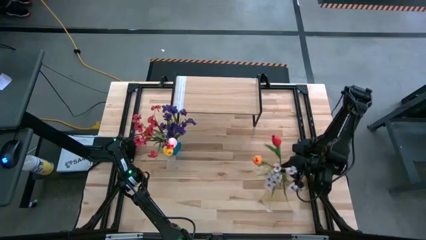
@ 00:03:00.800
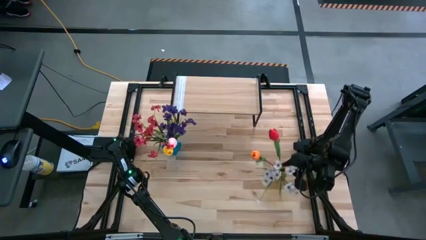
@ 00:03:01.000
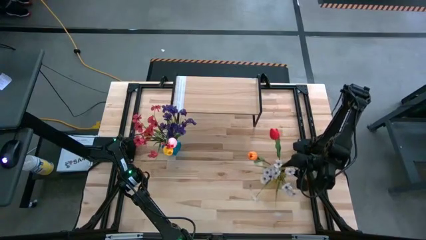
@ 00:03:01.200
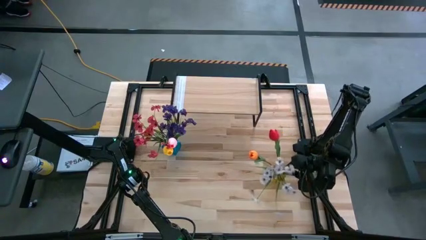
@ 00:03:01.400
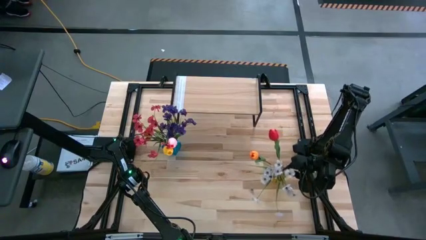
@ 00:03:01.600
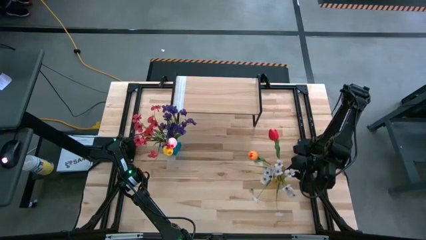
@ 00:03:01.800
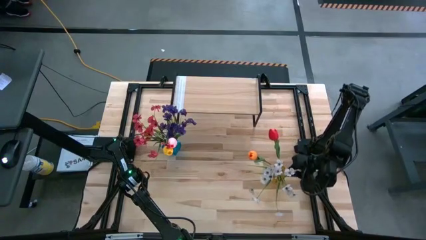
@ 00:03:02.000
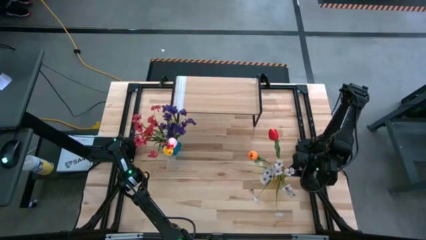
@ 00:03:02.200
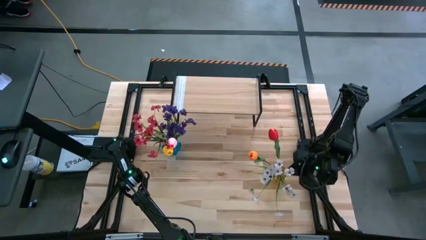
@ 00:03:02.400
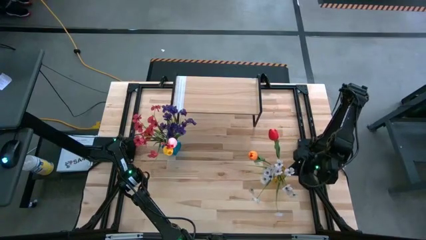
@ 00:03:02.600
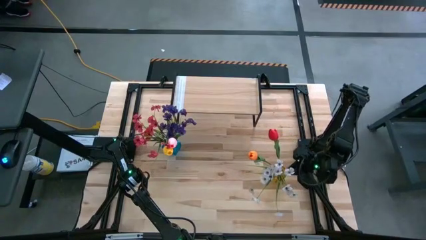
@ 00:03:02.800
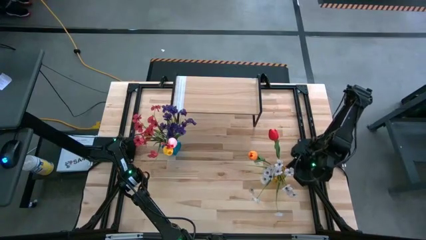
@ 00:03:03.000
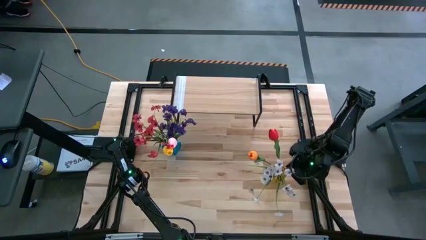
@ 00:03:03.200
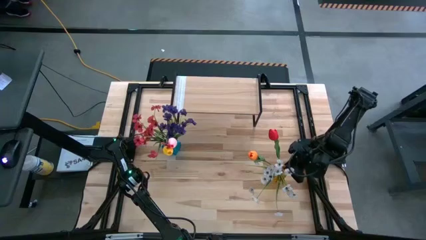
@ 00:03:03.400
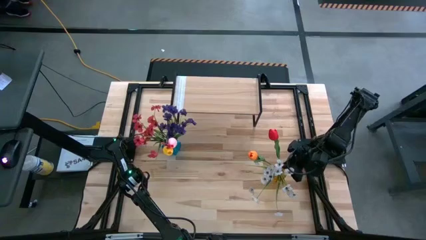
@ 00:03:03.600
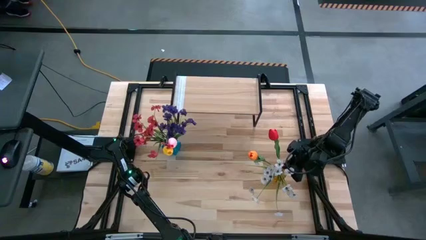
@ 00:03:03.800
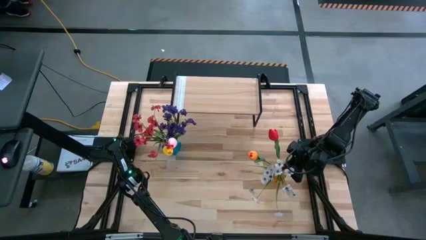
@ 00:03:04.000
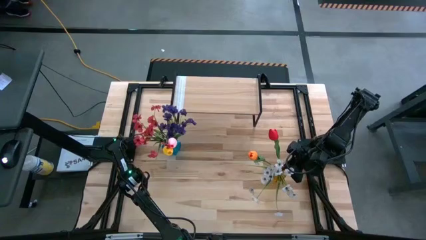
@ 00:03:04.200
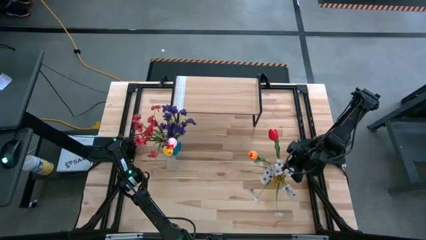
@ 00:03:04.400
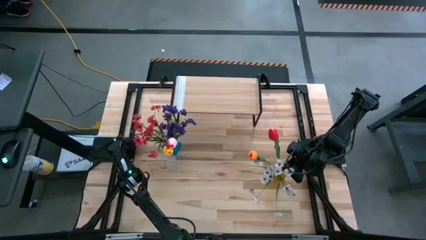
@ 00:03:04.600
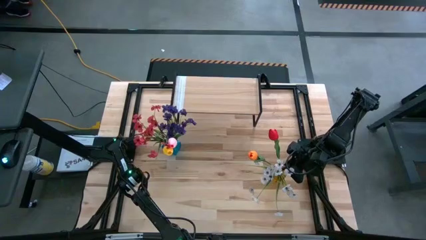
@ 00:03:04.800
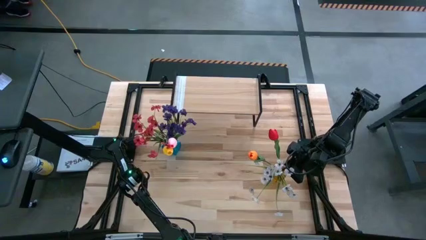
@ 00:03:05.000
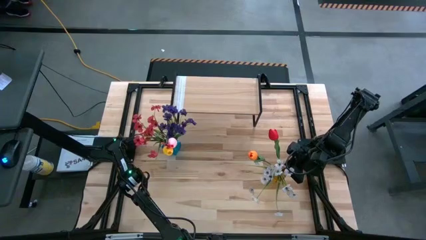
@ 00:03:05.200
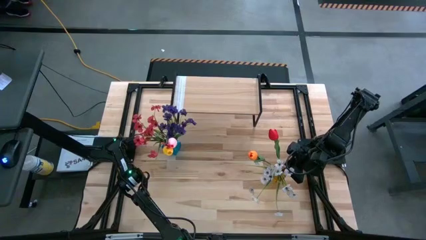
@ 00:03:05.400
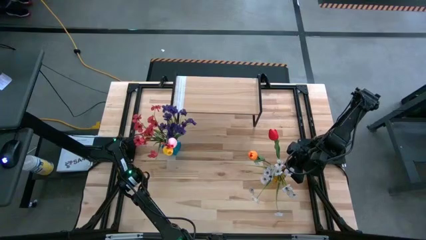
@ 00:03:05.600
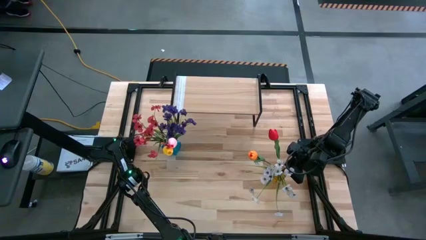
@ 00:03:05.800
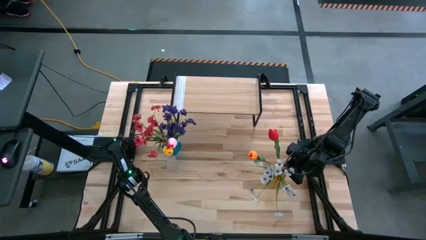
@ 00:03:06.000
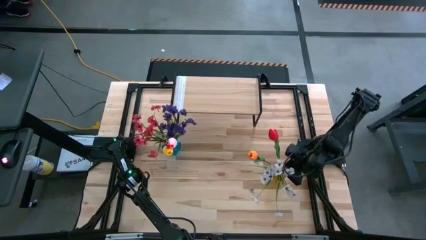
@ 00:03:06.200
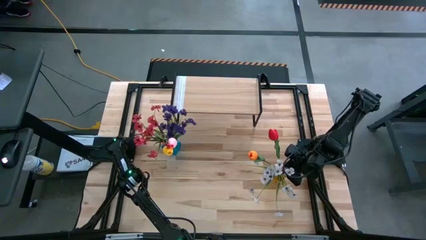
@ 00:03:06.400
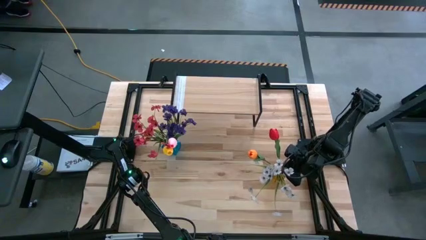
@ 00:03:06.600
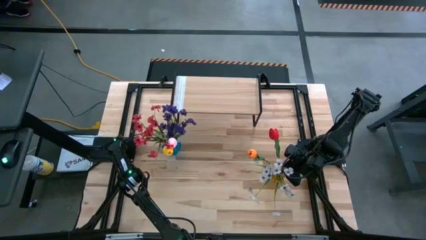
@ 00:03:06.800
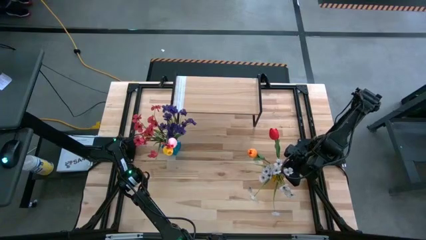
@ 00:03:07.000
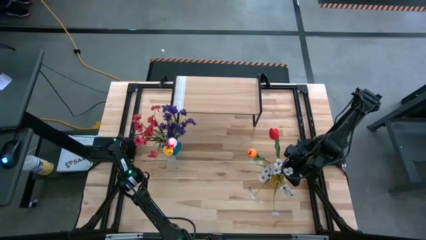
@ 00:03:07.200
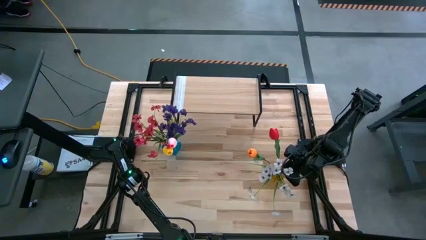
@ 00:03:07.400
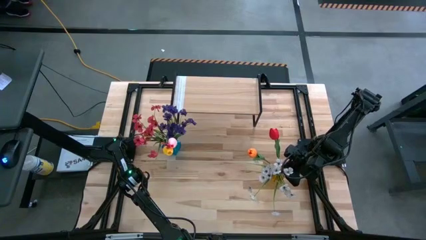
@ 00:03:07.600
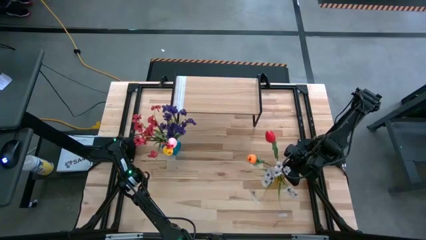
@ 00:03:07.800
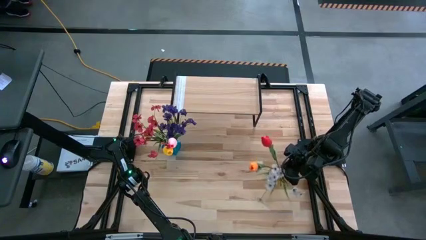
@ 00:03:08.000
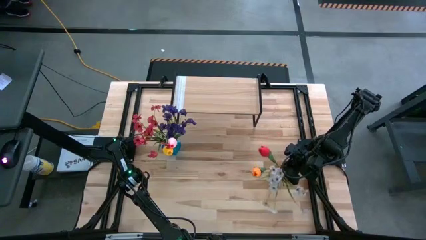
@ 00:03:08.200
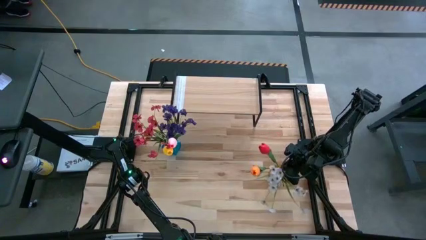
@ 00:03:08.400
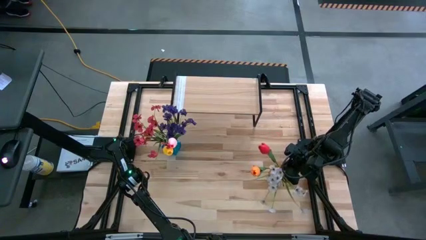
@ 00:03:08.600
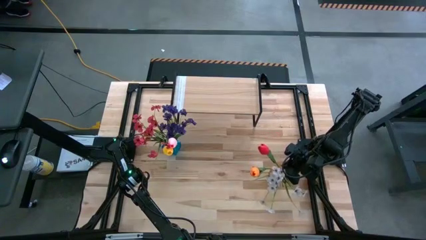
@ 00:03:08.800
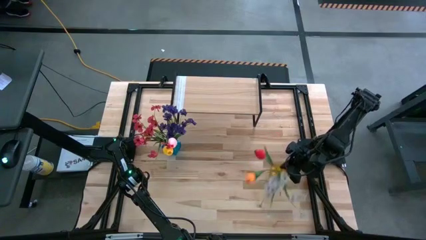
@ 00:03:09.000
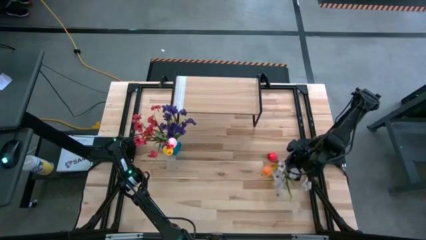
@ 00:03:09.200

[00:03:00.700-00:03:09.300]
Task: Pick and place flowers into a vace then onto a shelf
Put the yellow vase on the shelf

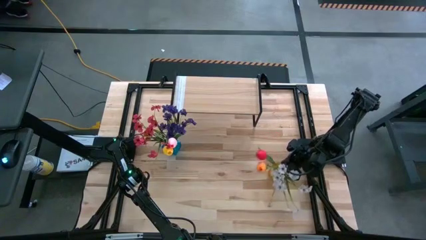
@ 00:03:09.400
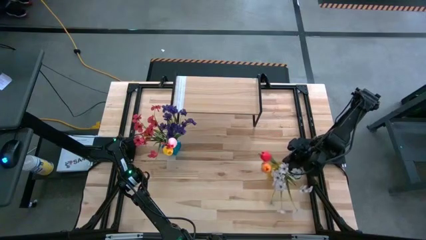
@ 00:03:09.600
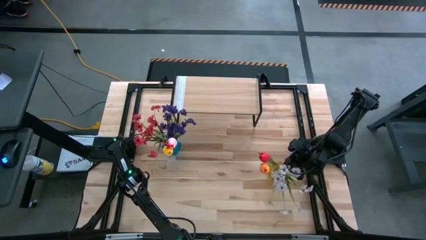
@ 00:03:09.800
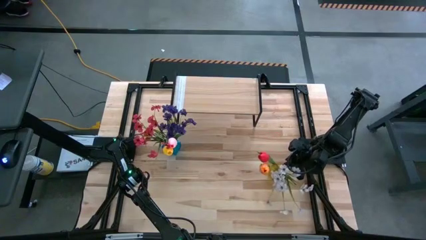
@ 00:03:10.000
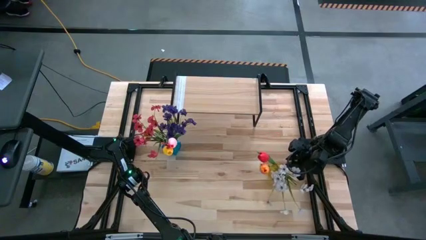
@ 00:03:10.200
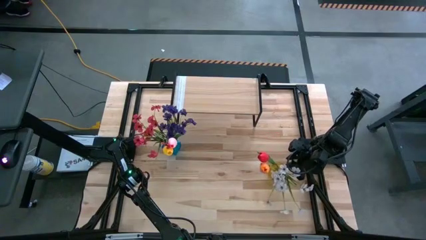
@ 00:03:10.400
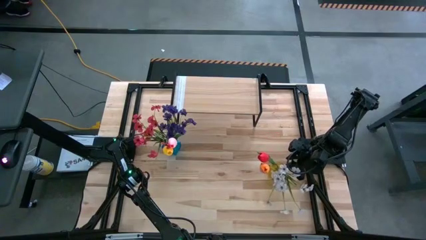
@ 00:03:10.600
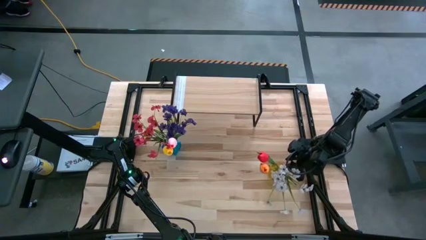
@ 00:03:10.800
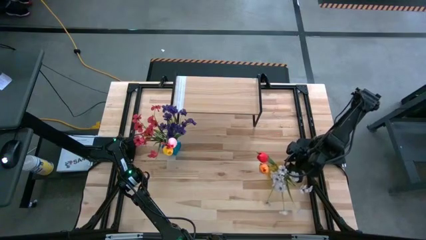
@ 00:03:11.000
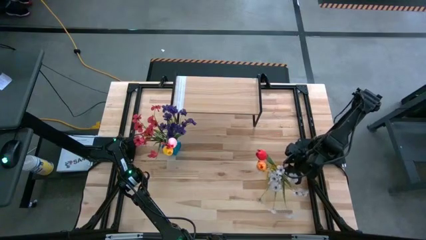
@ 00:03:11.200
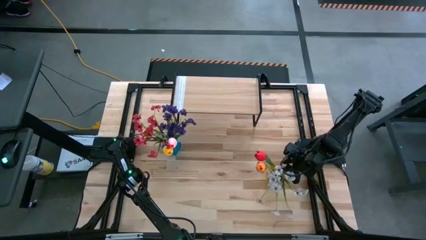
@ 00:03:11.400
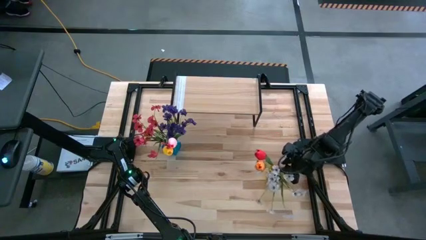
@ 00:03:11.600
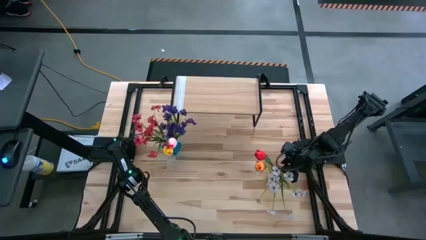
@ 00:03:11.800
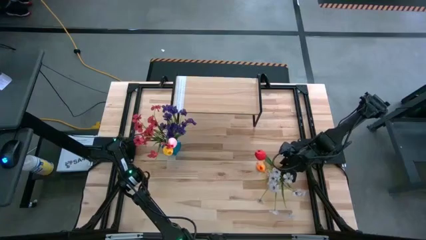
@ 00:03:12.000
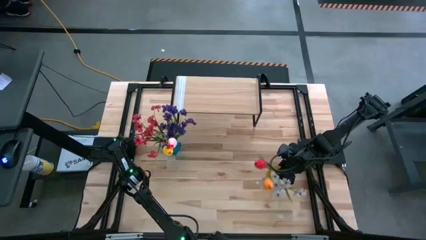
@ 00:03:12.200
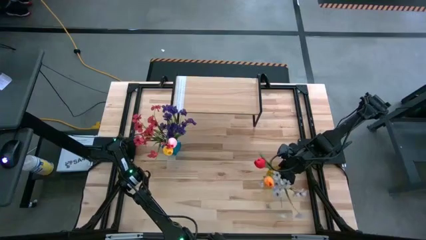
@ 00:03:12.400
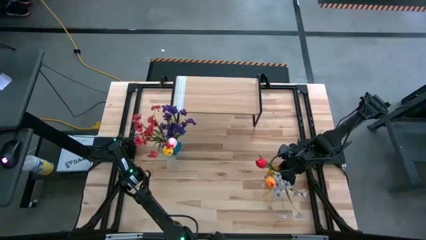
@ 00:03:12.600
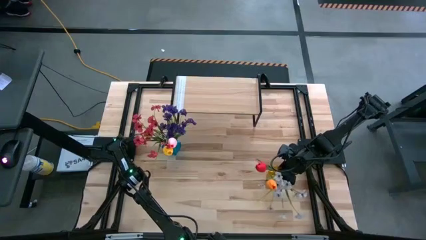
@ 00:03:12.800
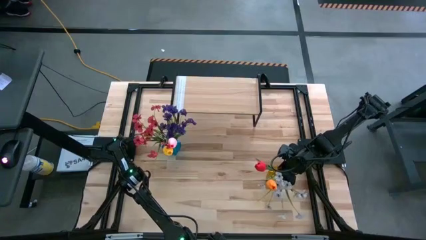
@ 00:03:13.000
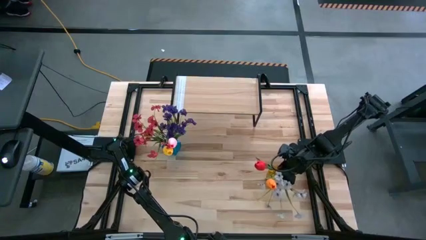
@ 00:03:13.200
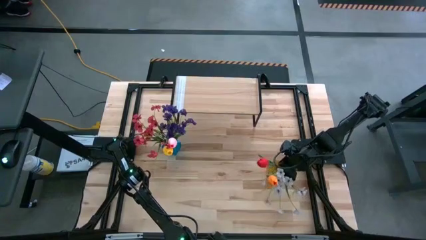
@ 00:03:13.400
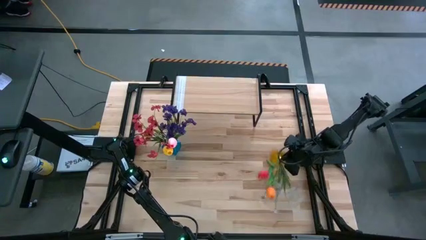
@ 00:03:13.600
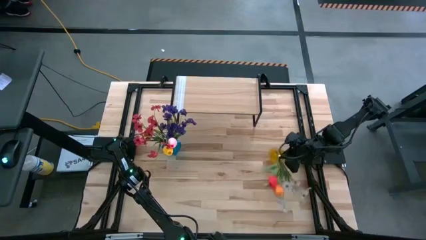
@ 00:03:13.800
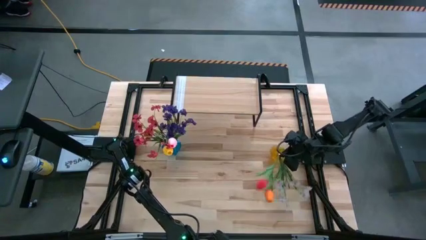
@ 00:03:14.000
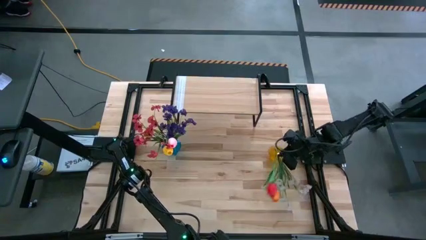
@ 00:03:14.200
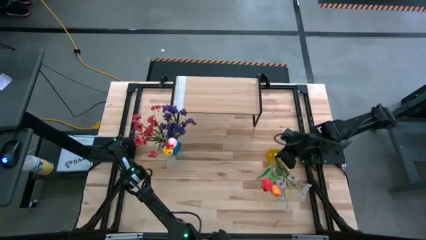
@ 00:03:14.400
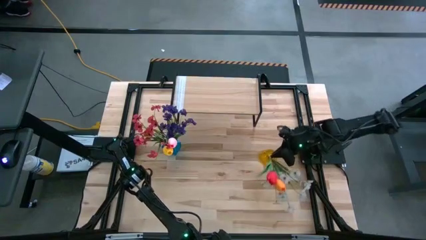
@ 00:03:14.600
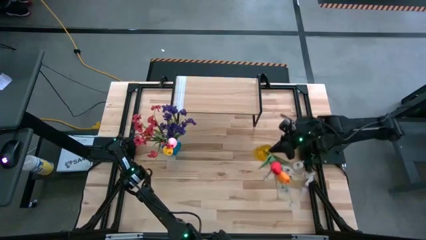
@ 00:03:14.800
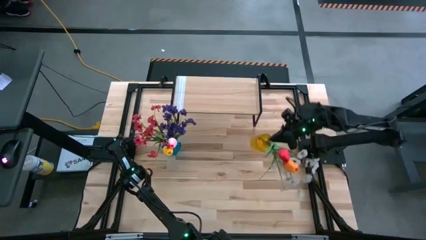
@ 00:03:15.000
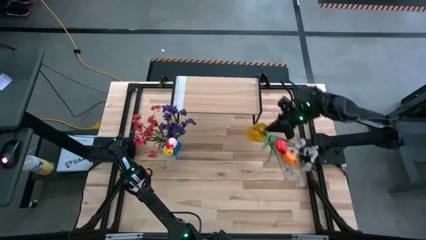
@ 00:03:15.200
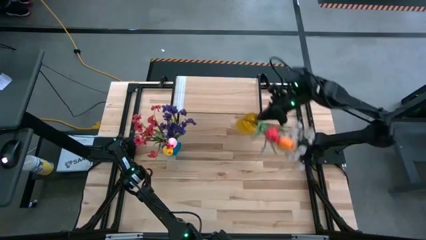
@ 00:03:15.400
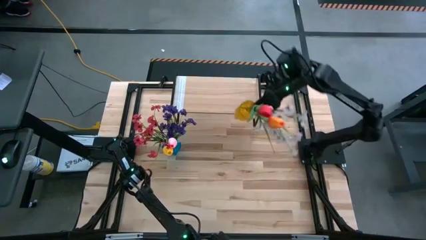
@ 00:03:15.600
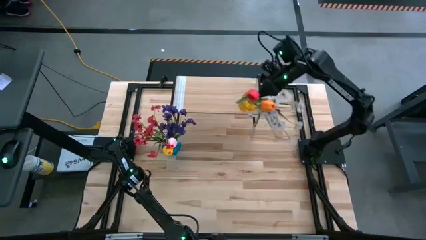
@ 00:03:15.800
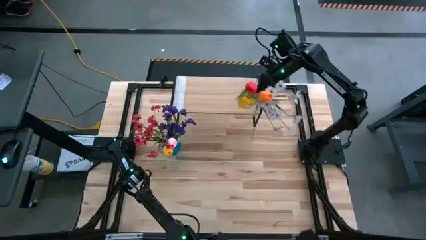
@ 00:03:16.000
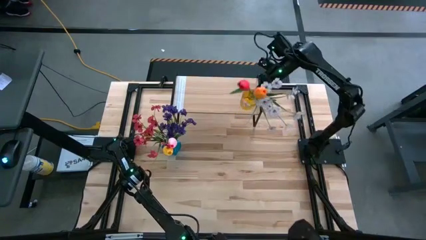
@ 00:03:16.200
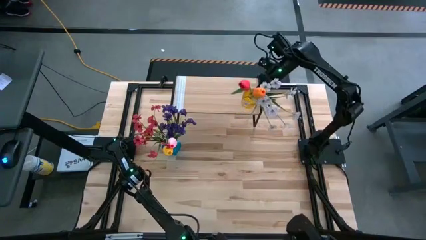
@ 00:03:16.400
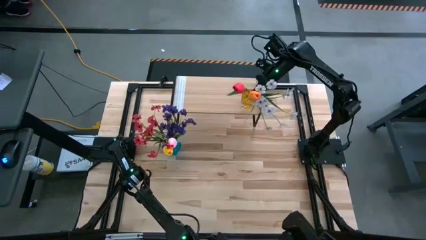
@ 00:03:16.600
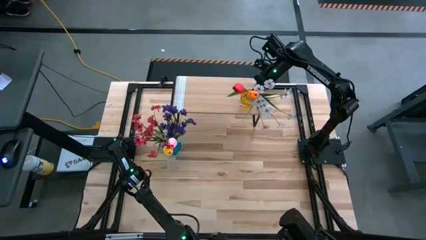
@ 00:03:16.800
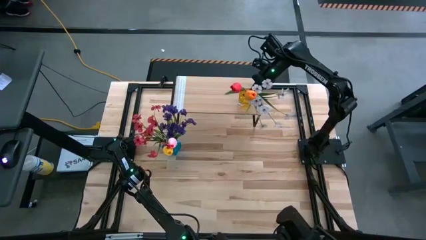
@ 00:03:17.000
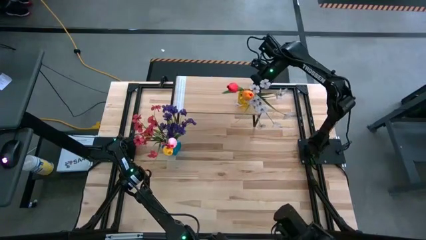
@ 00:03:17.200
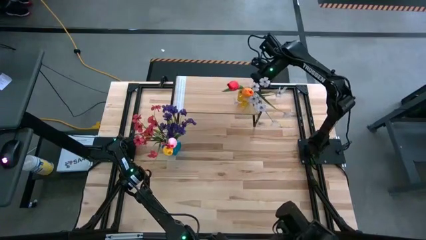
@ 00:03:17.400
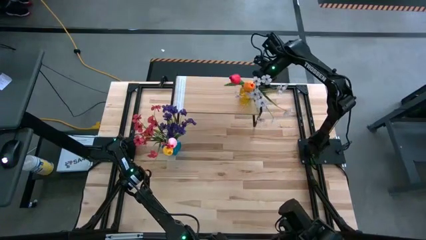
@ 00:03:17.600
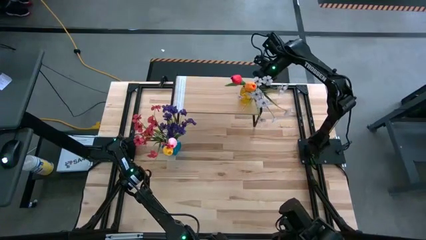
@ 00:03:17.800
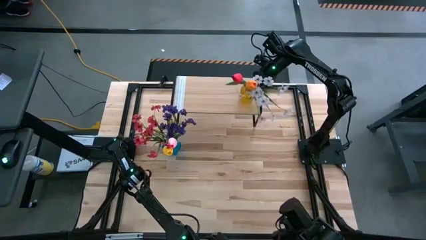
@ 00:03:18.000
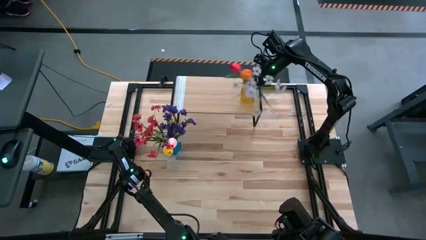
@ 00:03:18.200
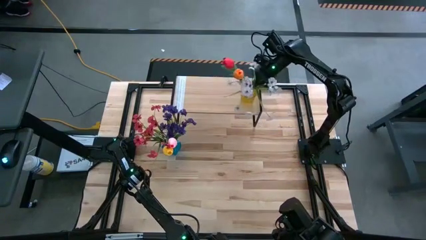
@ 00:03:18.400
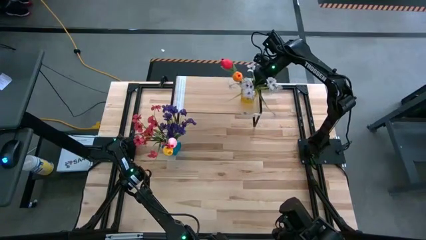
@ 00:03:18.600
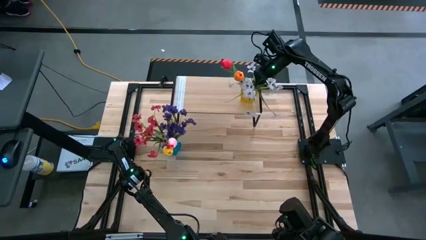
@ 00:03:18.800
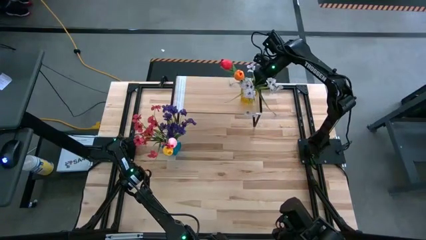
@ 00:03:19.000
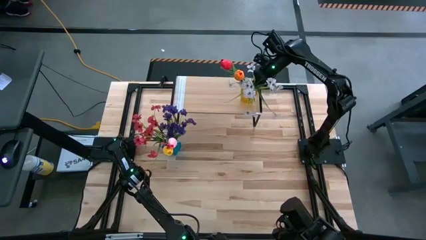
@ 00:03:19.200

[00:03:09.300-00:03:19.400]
Put the yellow vase on the shelf
